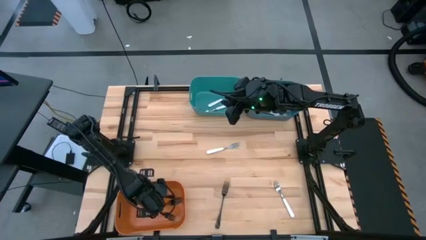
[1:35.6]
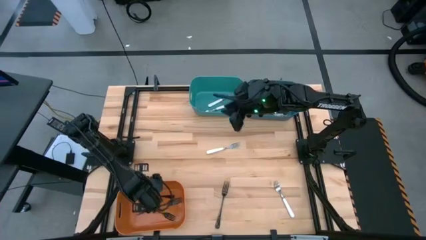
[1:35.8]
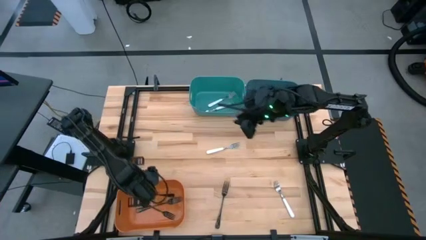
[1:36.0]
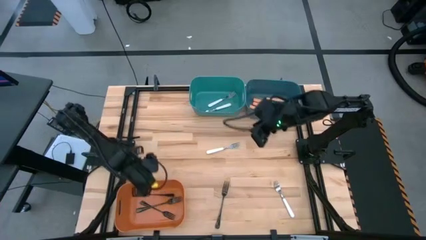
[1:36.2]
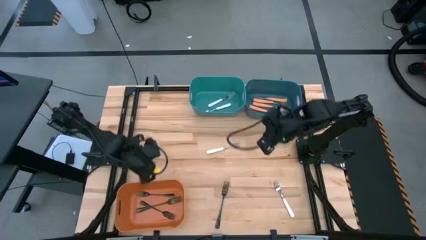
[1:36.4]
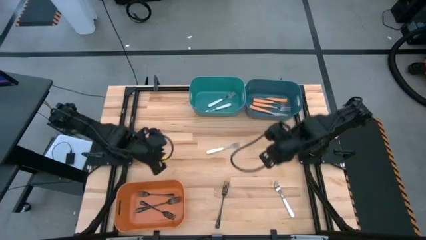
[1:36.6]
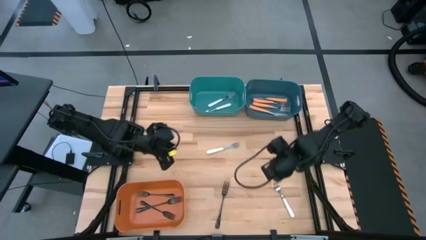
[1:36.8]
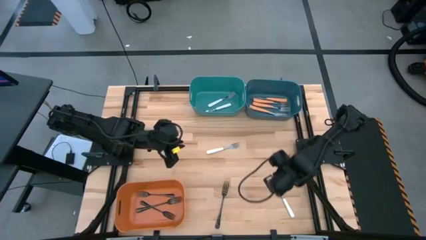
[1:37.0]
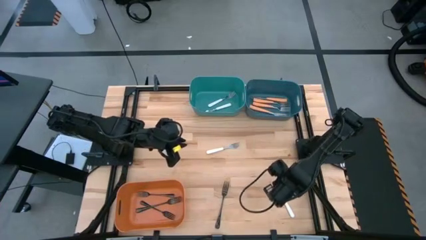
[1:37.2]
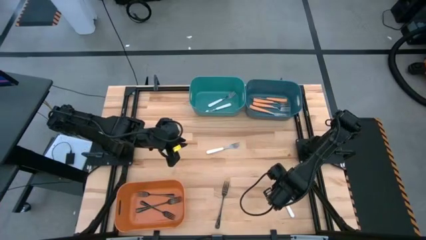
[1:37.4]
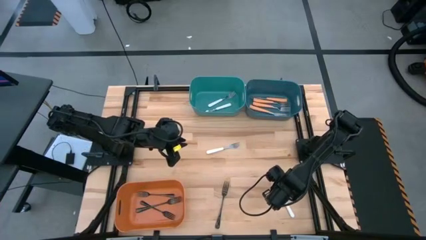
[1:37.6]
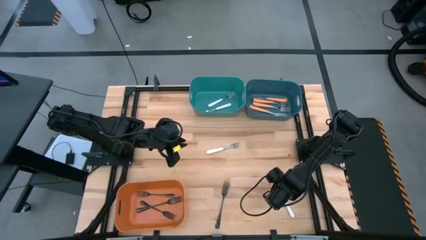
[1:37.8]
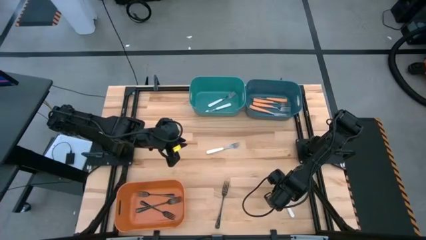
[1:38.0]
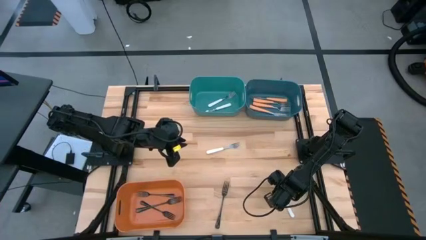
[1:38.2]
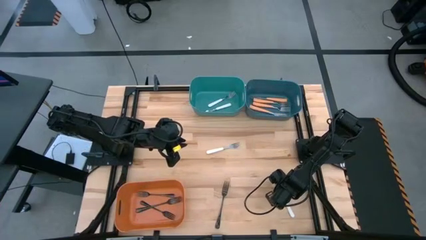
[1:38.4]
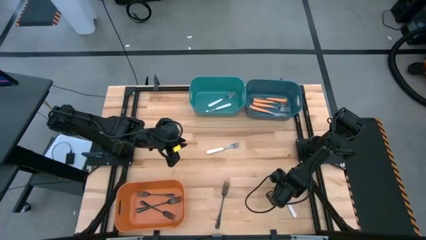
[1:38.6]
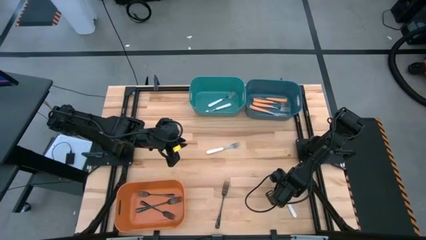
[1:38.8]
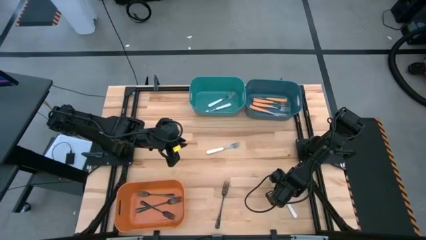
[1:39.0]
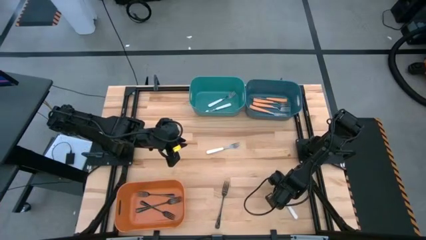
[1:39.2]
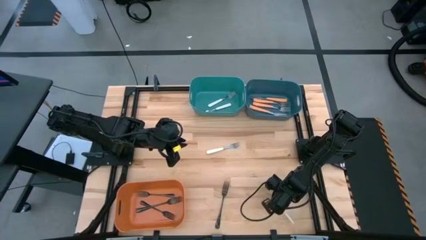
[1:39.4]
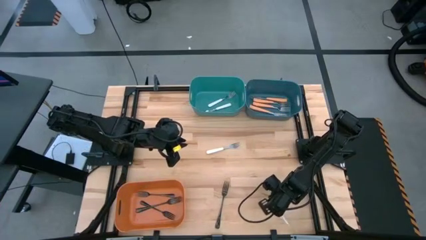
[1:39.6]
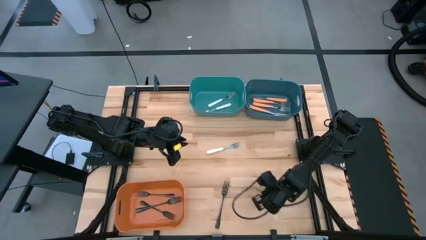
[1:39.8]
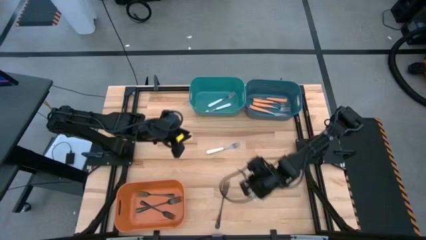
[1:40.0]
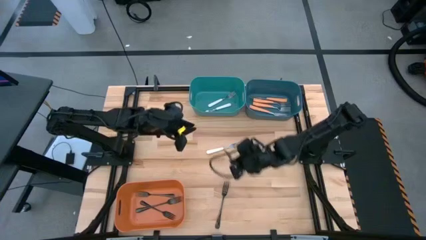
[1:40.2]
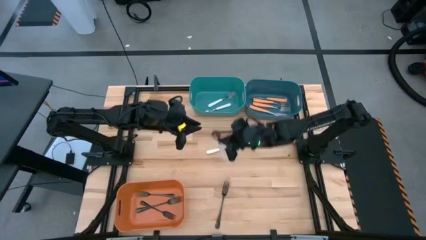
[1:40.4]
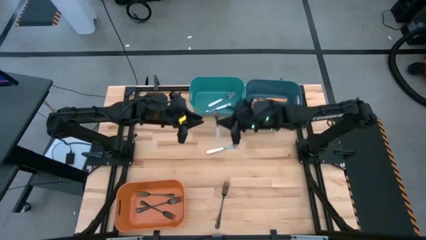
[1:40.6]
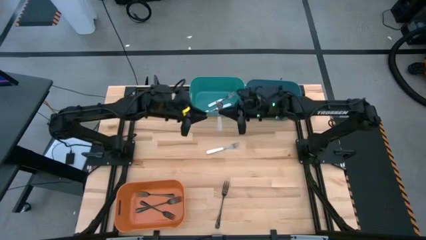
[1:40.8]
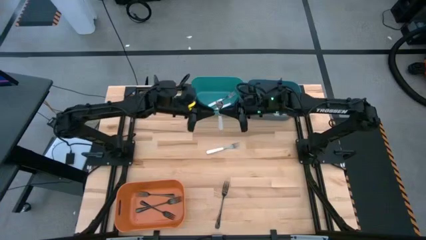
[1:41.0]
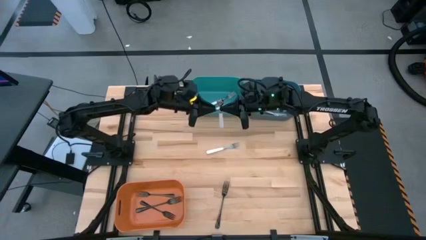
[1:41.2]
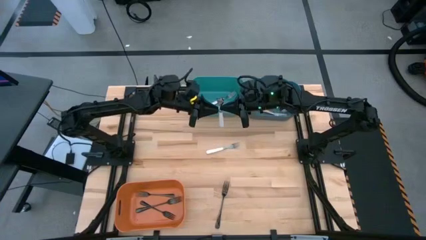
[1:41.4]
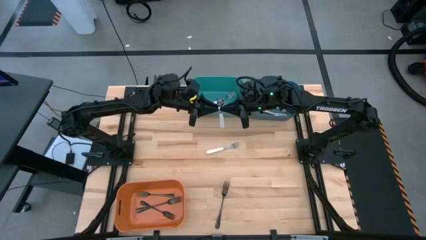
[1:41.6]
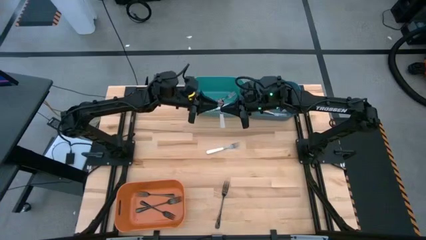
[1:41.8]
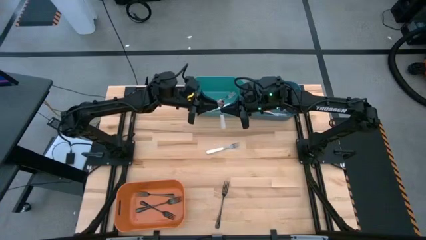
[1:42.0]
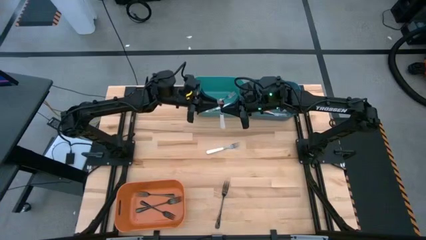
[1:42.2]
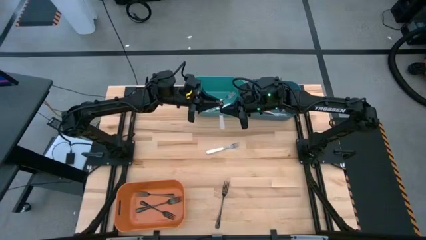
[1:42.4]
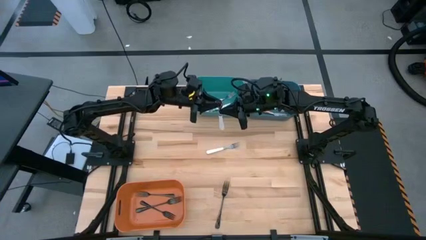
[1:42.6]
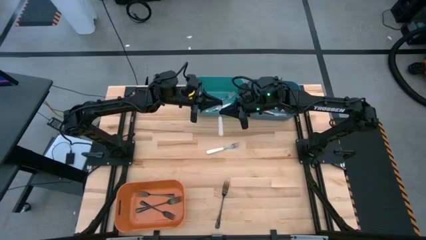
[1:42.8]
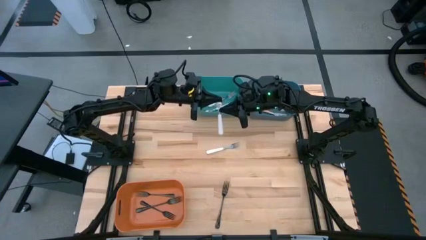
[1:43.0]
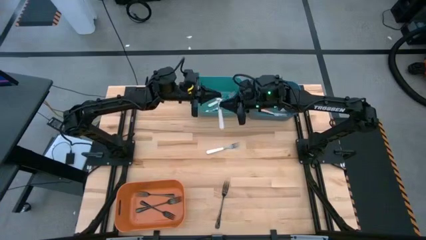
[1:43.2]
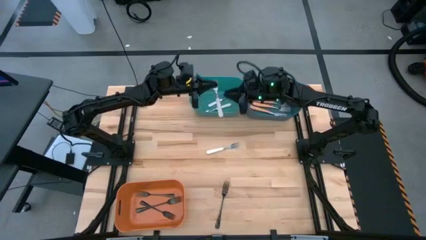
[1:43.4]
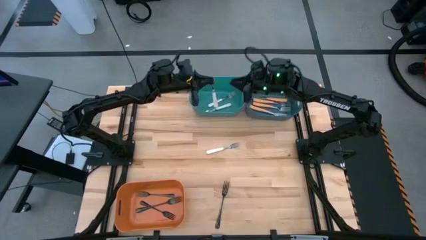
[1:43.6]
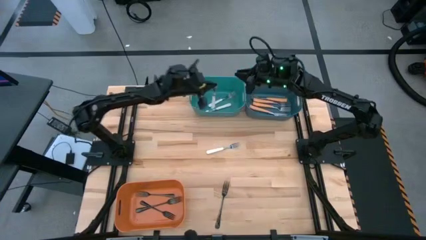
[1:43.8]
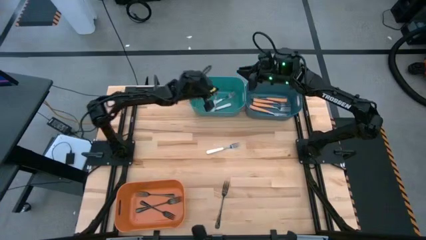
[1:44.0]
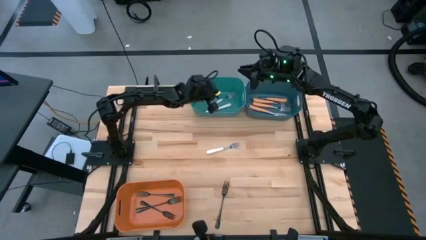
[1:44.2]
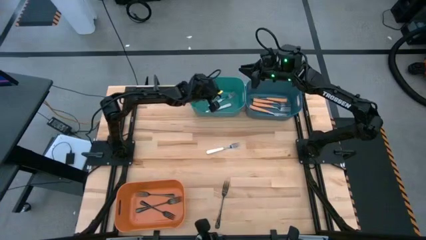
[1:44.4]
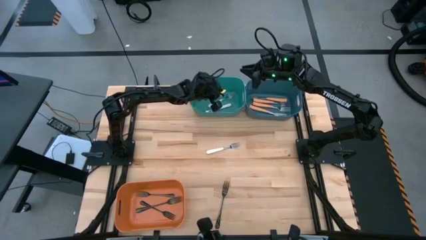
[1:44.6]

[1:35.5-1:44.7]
Task: Sort silverware by color (type)
Put the white fork into the green bin

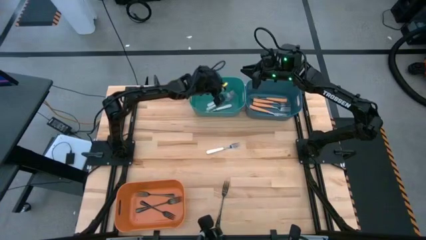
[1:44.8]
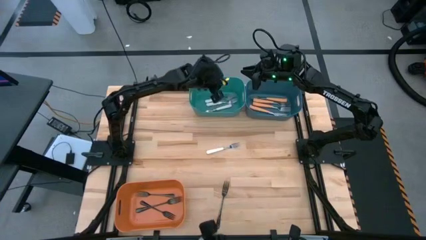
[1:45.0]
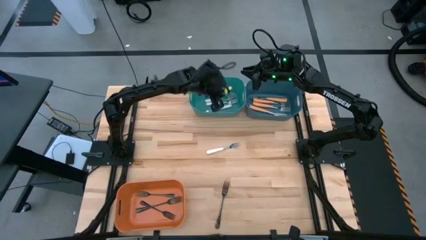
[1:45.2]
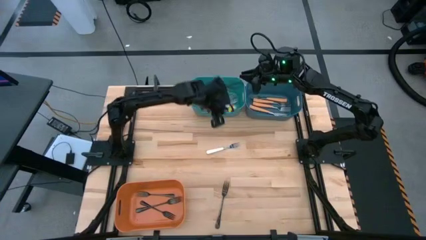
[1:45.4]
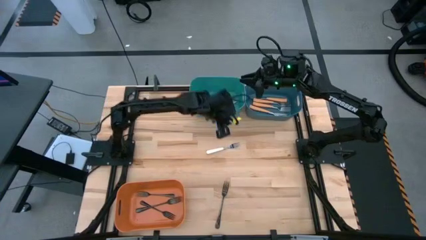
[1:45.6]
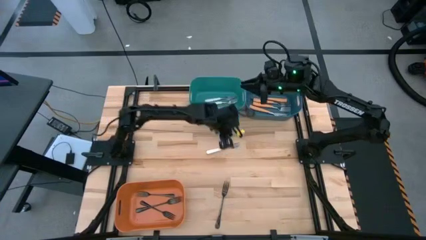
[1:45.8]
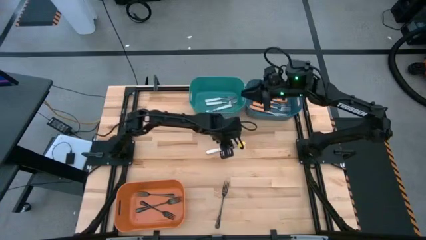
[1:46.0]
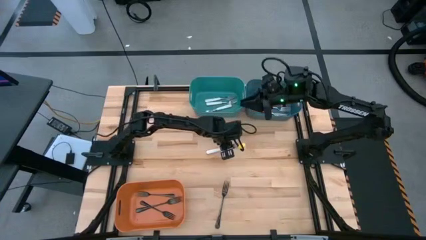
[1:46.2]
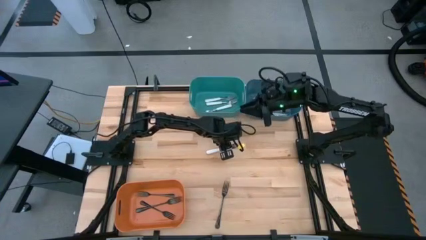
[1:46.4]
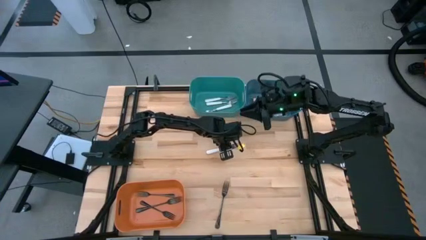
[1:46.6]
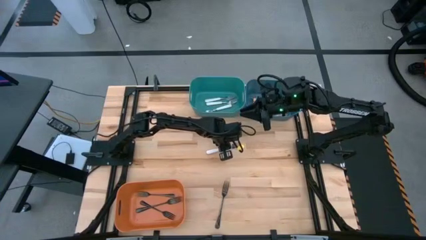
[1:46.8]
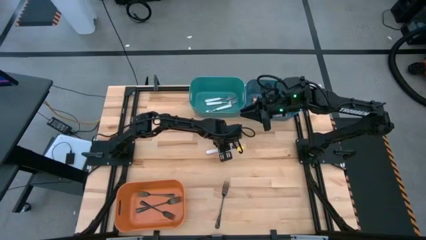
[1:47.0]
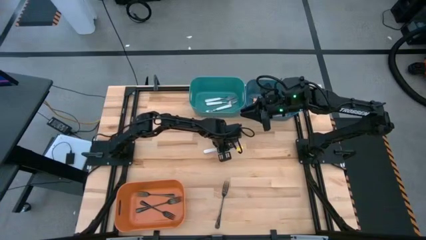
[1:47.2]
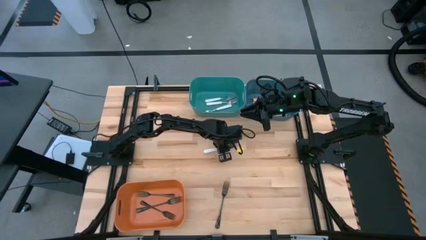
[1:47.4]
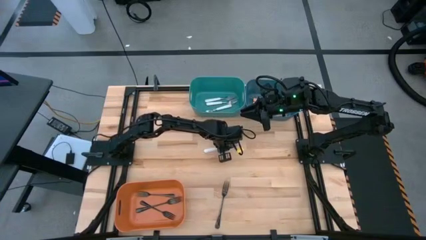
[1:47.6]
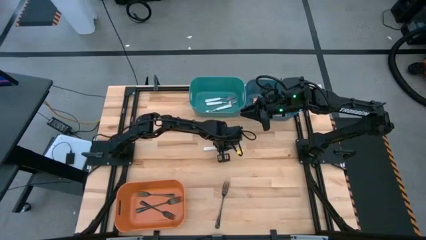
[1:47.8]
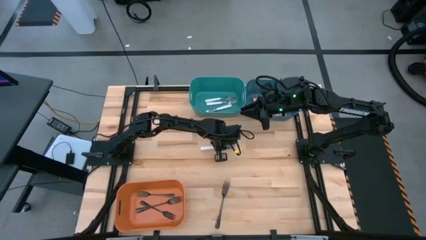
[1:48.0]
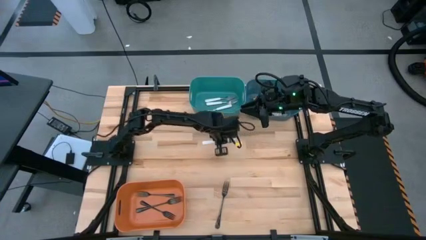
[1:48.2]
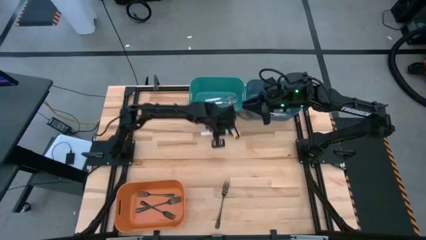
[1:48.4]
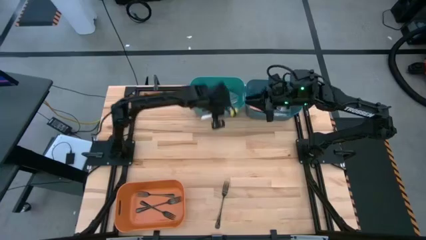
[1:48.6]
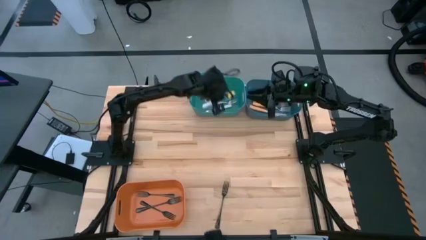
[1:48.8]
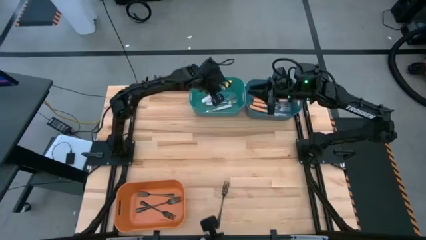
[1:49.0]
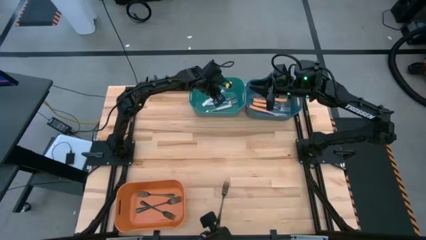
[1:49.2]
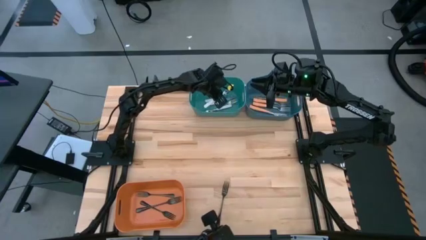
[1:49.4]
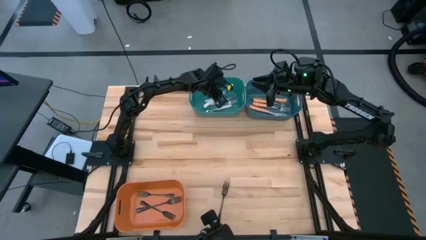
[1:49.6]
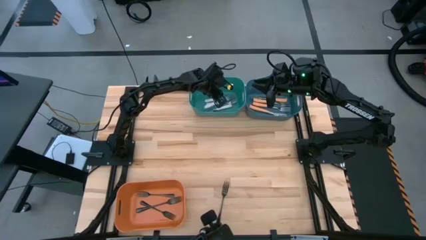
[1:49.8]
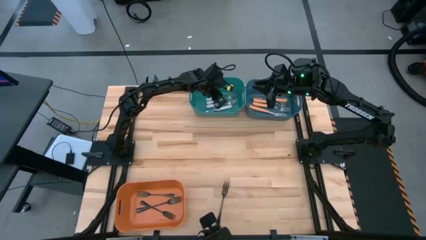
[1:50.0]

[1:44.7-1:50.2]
Put the white fork into the green bin

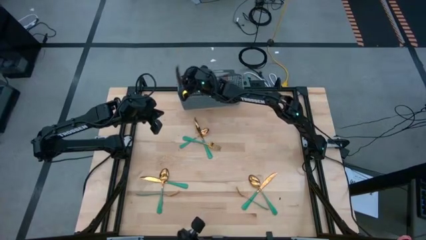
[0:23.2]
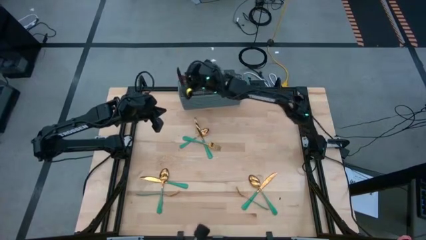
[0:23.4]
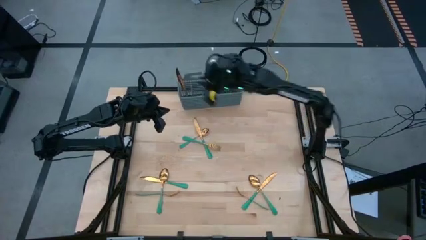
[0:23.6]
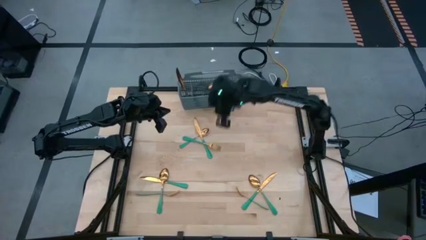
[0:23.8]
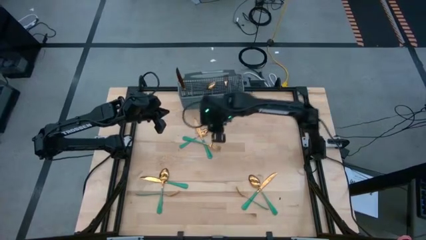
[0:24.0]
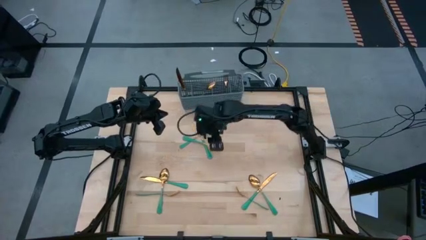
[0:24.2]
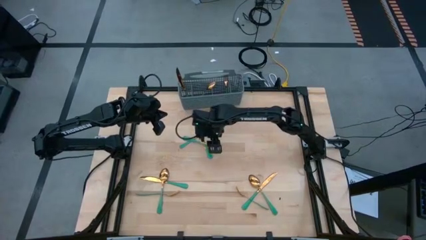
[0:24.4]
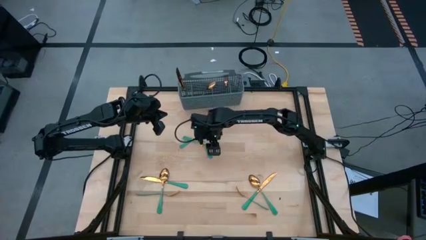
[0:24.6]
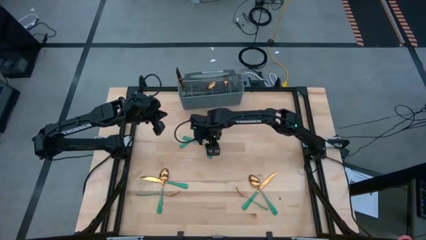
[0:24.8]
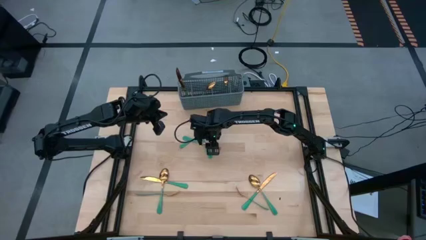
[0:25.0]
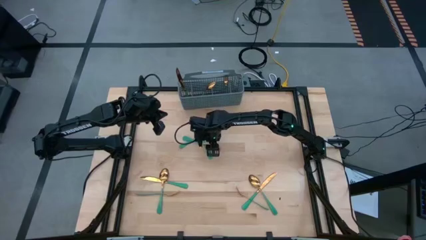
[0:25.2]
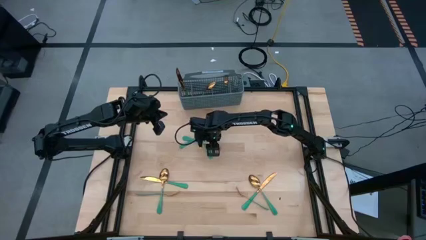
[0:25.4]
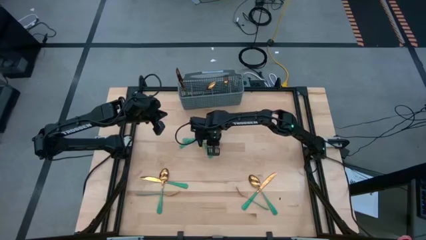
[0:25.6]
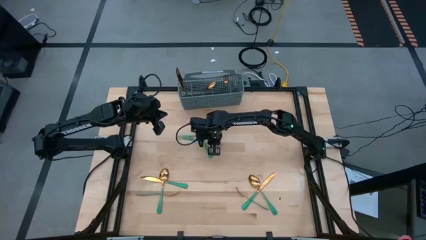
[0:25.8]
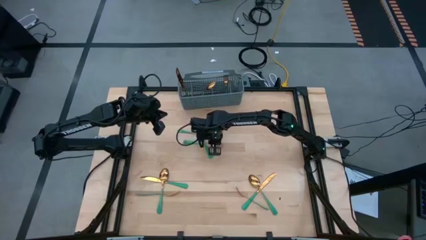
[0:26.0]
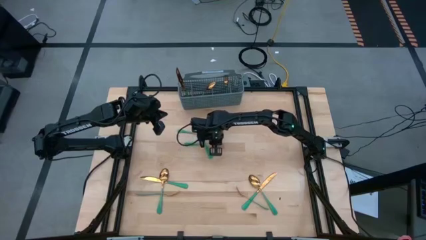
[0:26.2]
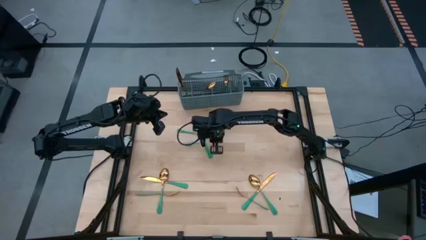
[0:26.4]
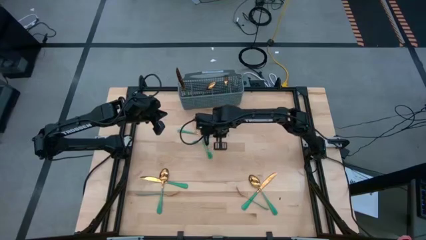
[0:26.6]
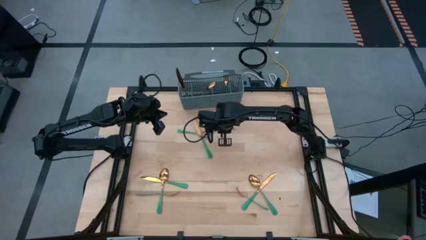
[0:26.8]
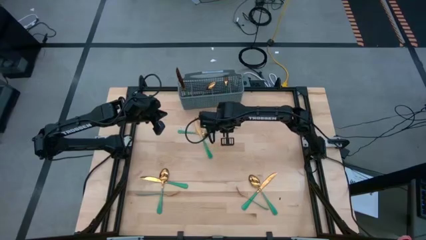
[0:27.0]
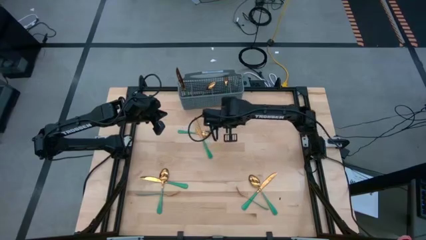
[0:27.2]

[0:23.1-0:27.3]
Task: Sort silverware
Put the green fork into the gray bin
